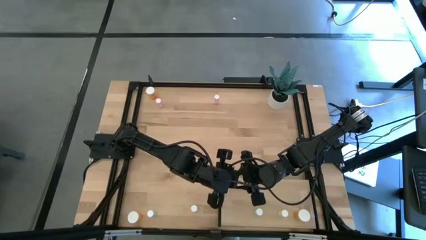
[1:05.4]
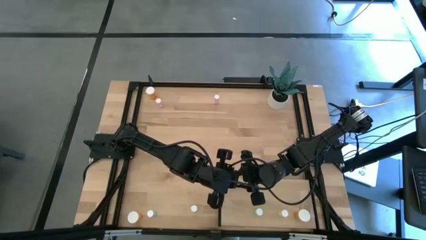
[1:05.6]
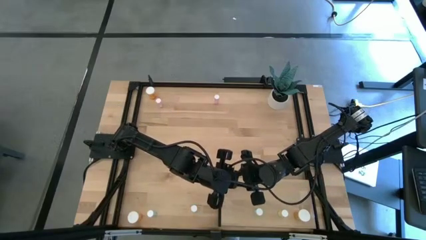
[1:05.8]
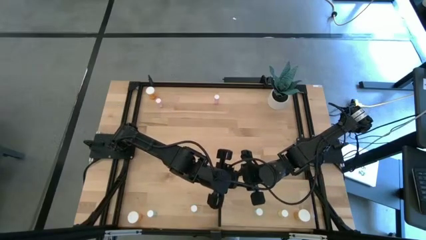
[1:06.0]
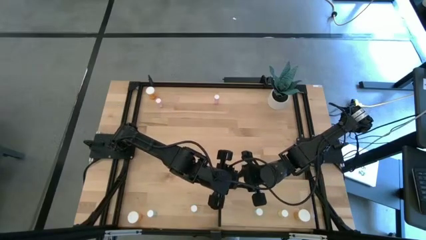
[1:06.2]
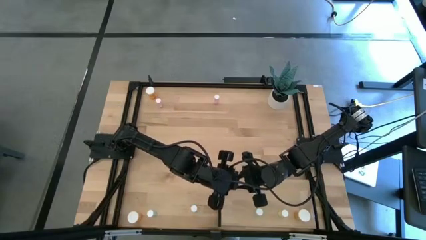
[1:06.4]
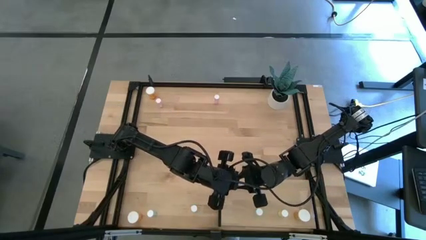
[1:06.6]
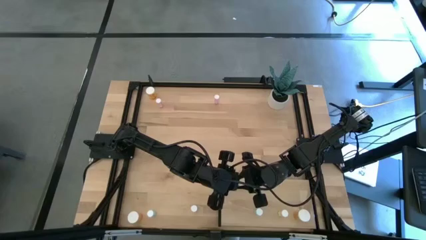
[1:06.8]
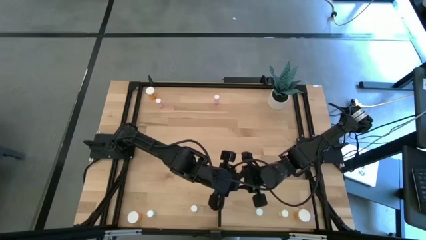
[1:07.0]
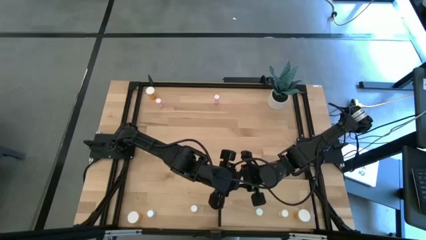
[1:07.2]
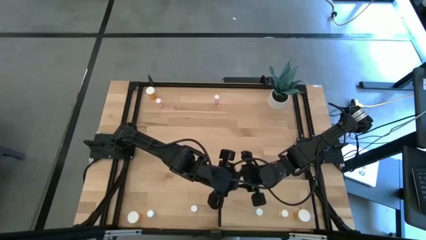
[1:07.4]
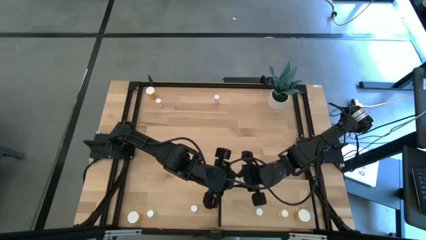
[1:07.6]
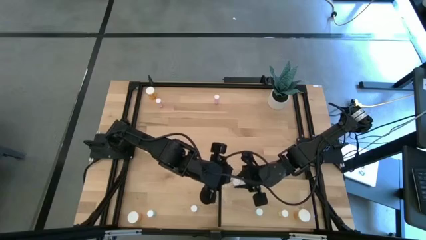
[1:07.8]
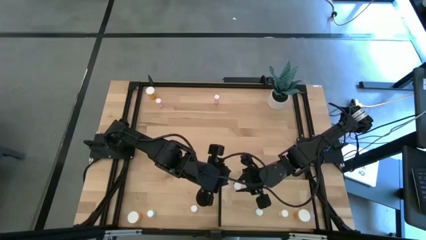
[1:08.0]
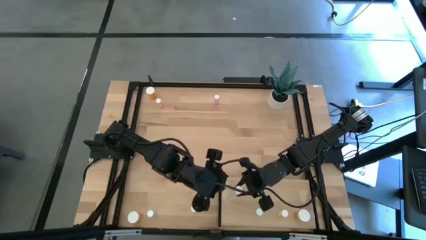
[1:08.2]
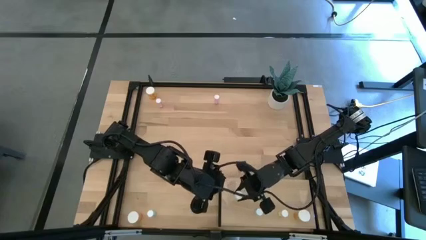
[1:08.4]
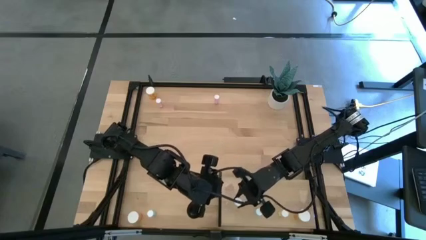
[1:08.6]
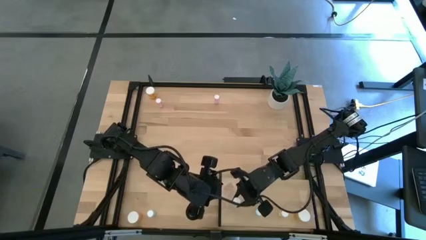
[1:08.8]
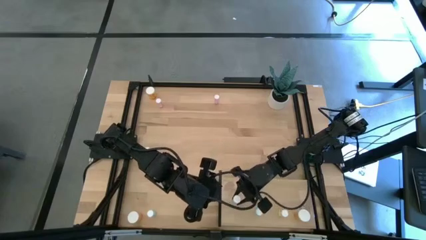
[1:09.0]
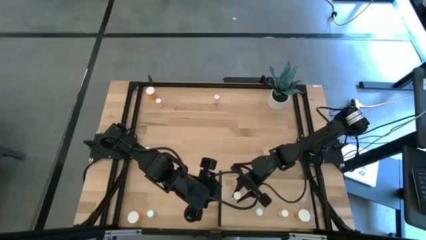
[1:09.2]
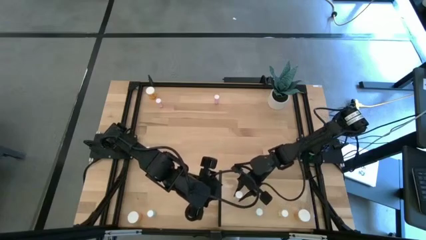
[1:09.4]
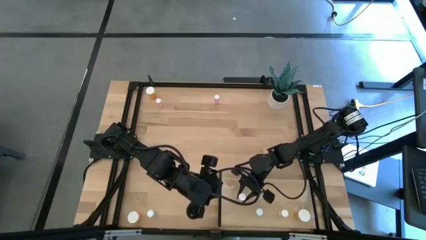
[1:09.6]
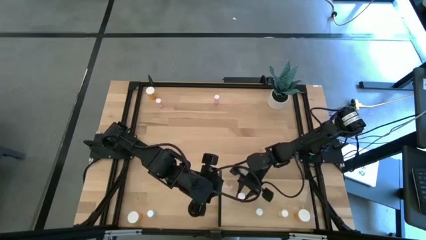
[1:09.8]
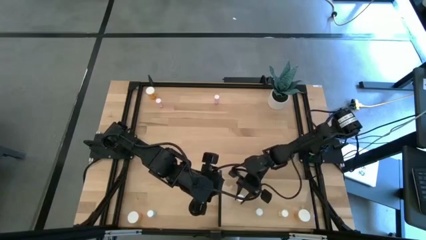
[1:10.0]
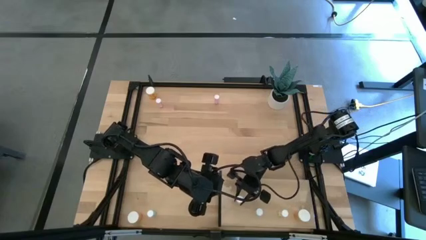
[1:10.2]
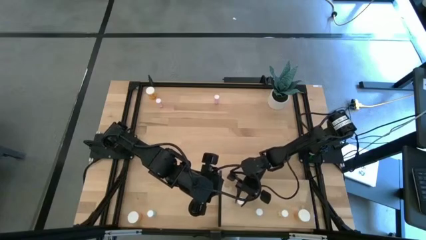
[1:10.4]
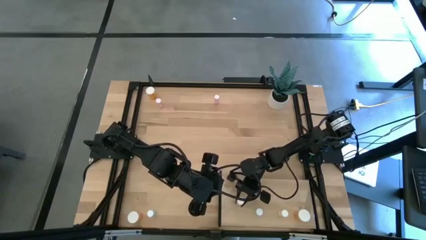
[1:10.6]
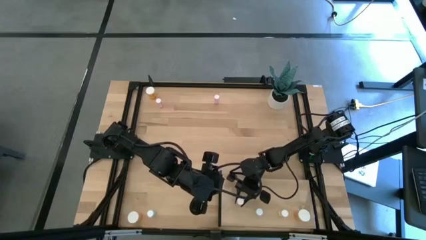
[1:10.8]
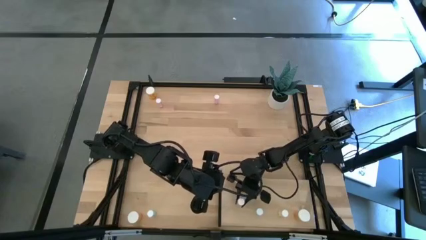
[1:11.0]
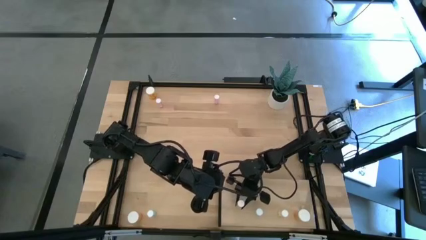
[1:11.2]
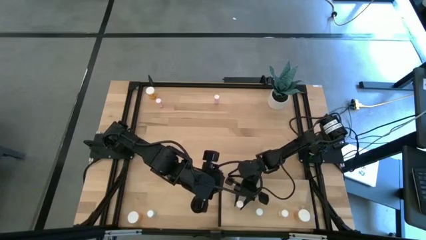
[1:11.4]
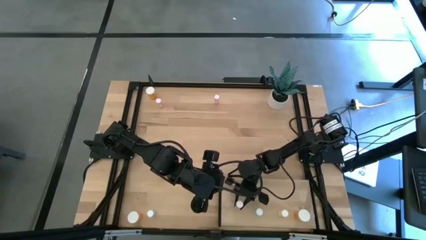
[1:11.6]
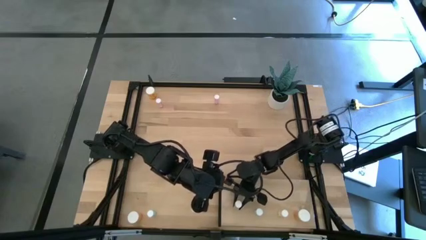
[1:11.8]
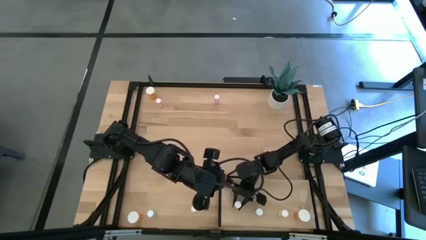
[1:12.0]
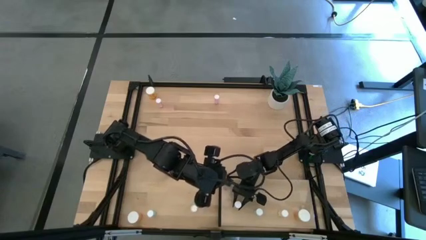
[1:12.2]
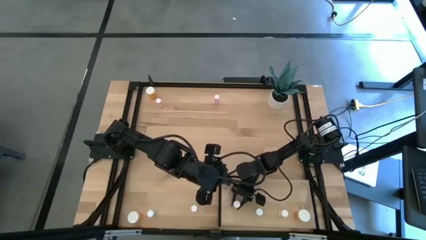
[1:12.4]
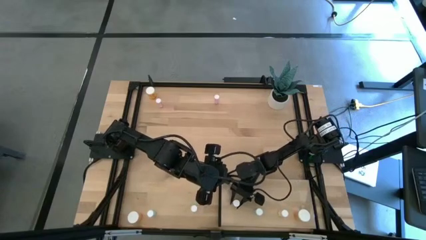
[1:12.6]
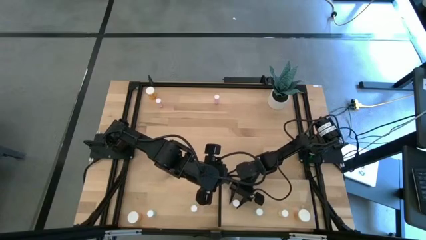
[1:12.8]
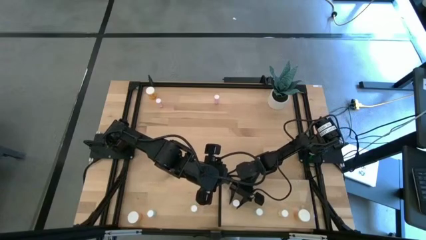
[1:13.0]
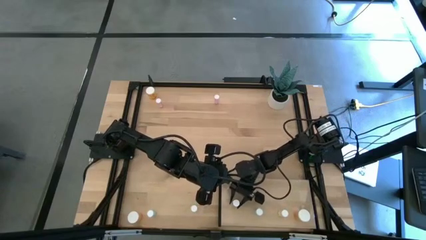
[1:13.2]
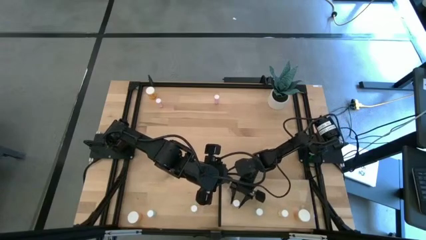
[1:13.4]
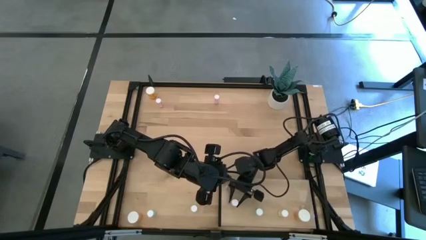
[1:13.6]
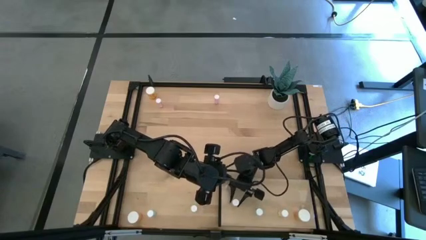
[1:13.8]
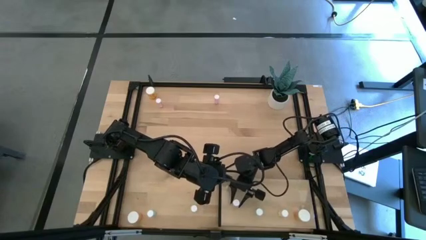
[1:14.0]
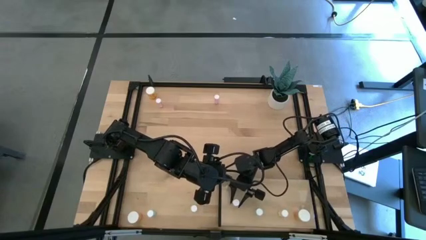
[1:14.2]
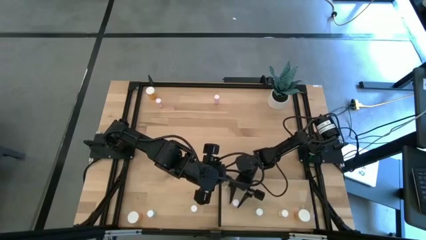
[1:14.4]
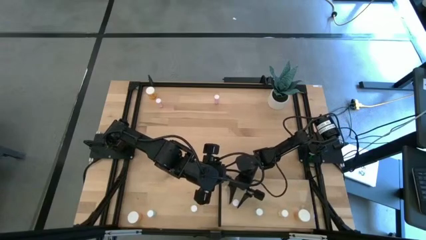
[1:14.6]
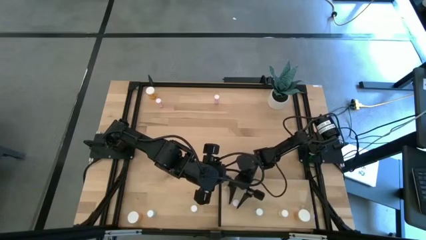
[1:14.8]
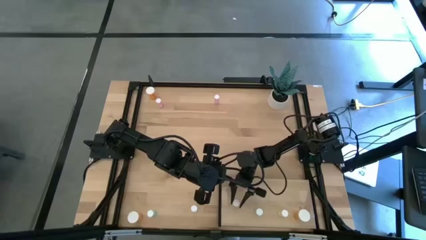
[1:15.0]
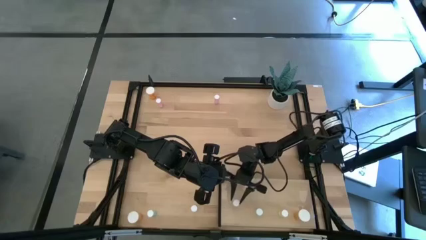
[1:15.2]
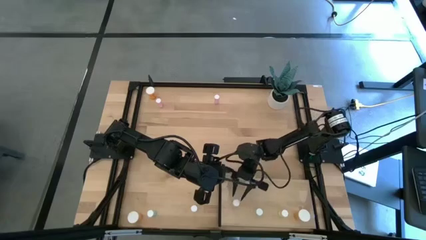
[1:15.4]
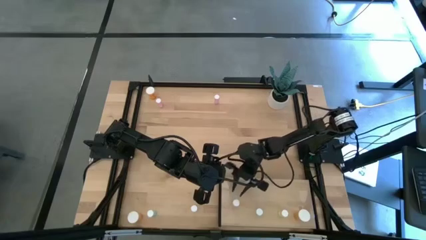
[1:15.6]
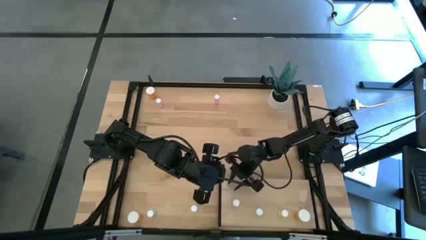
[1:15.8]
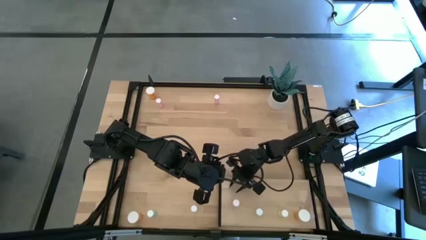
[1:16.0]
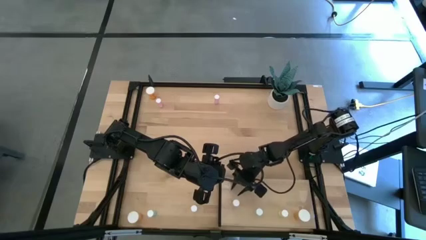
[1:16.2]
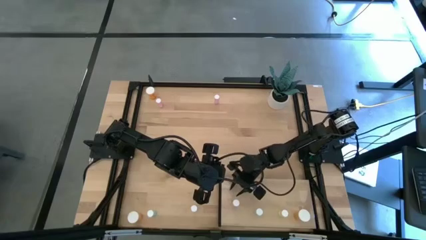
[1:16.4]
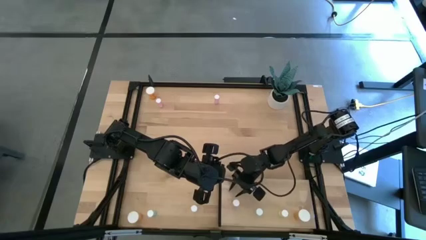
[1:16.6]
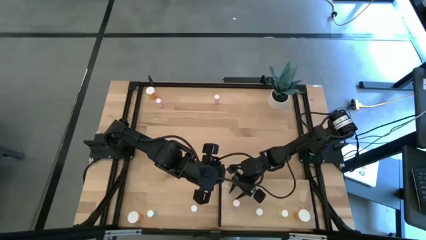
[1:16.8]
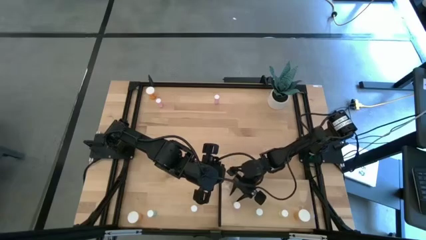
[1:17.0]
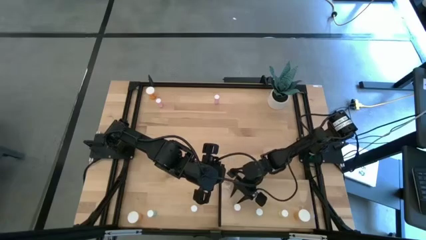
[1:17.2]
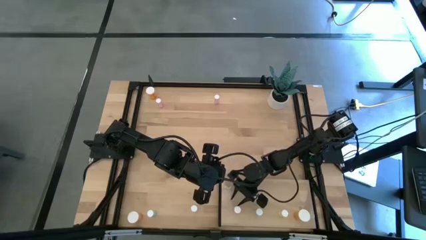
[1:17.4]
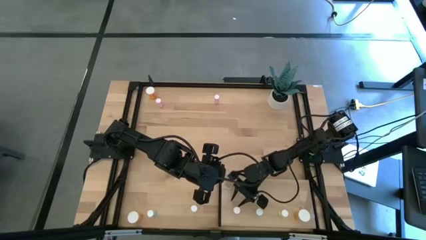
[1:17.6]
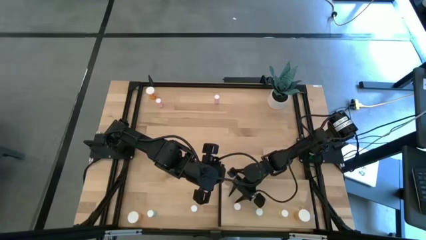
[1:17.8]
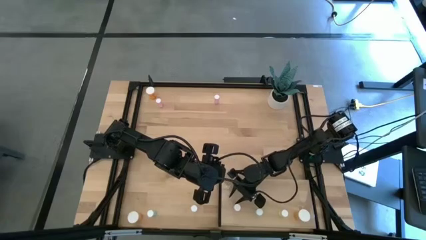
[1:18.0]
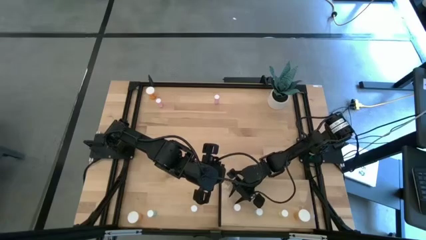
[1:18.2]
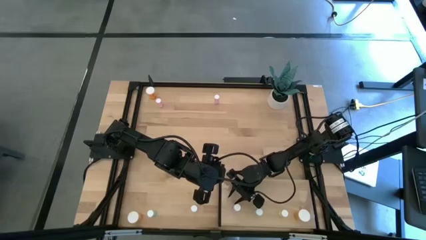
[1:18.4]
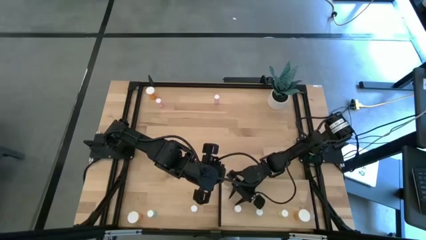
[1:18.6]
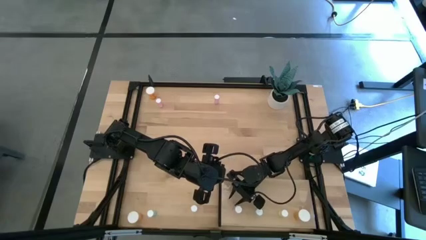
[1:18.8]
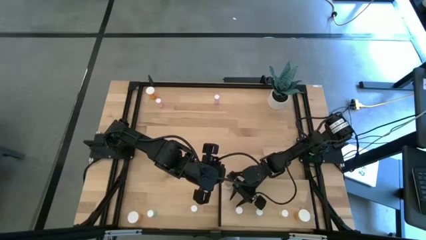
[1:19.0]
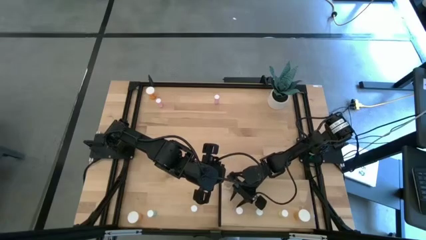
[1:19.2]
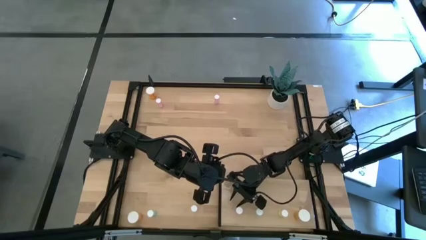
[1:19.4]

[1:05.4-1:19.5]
Task: Pick and place medicine bottles onto shelf by color
Put the middle pink pill bottle on the shelf

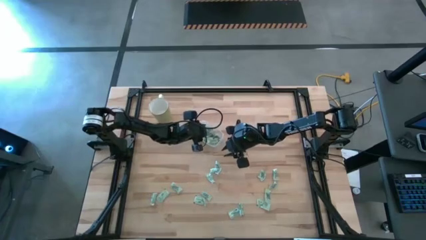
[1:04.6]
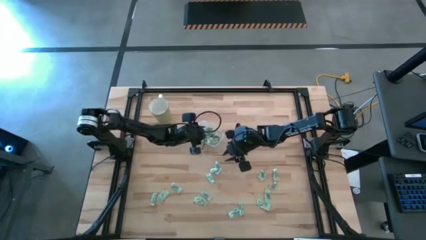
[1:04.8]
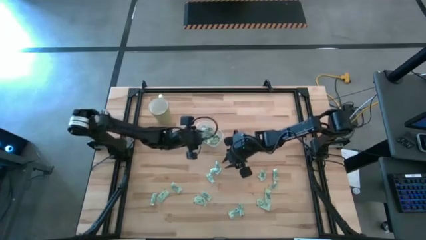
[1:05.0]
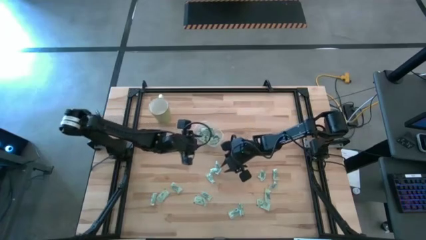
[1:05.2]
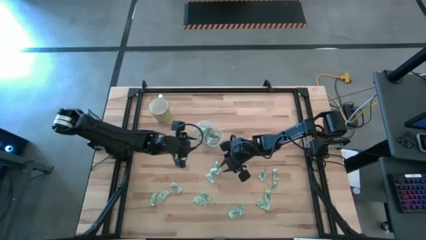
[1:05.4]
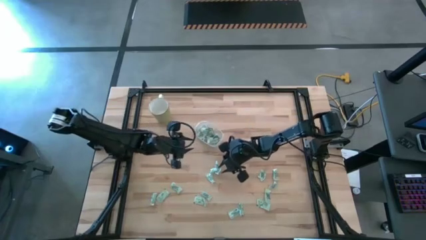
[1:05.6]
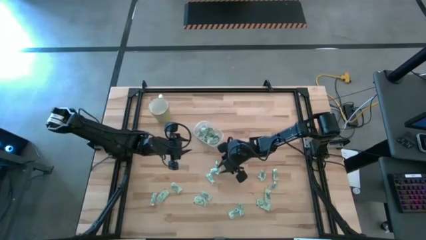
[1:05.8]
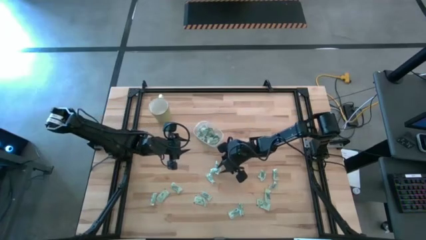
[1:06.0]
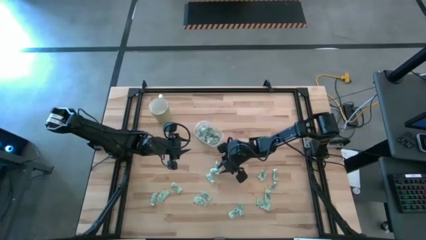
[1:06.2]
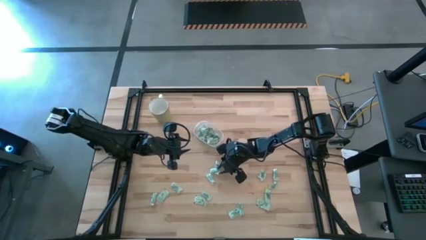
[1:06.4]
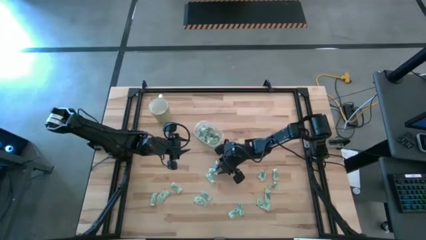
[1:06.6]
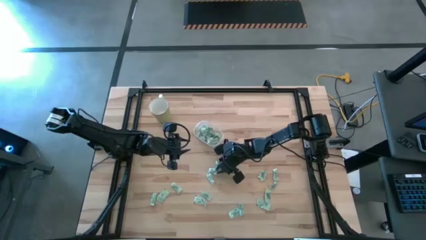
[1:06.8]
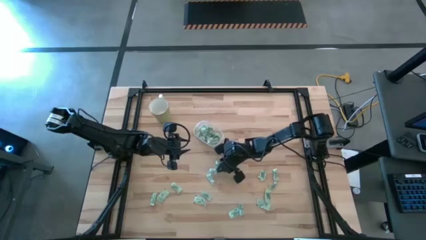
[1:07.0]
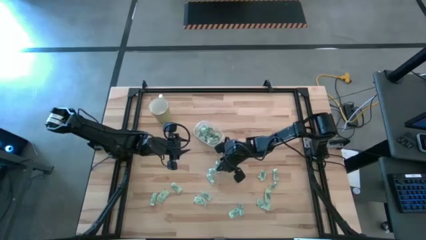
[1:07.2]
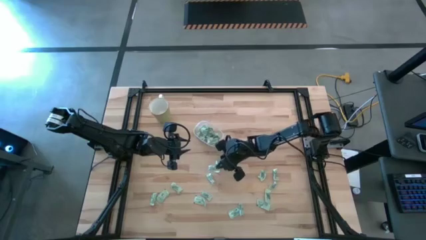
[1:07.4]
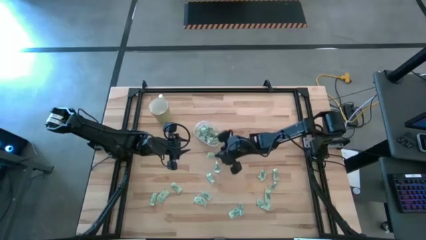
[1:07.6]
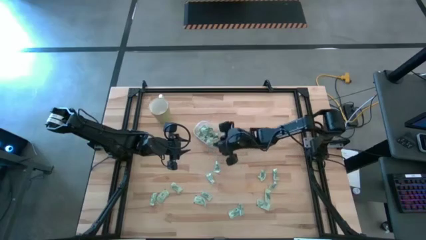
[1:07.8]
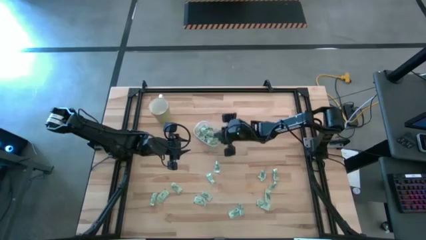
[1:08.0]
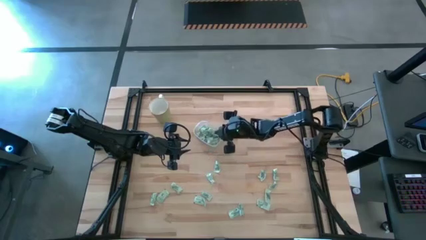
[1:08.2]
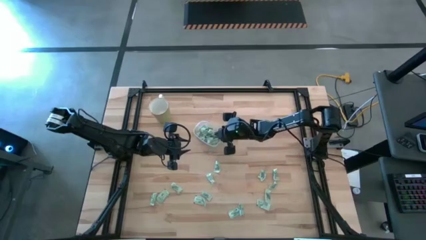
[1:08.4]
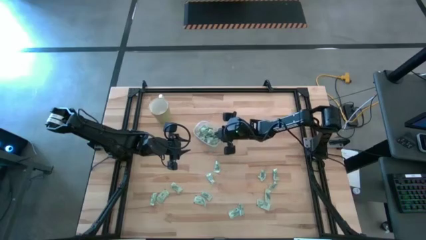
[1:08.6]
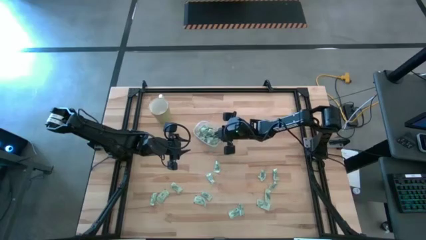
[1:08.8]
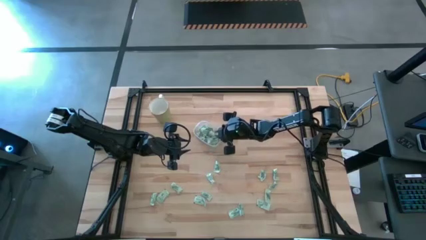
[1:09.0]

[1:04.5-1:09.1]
Task: Pick and place Stevia / Truvia into bins
Put the stevia packet into the transparent container
